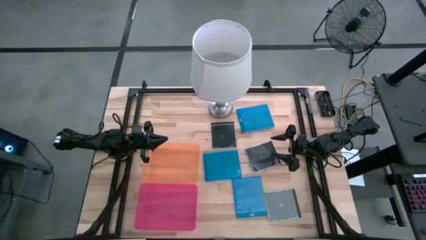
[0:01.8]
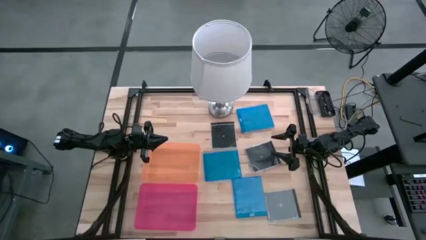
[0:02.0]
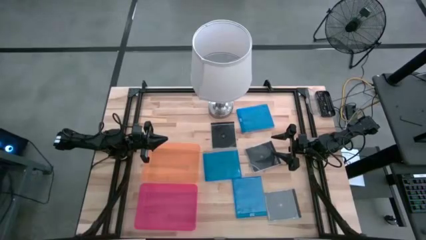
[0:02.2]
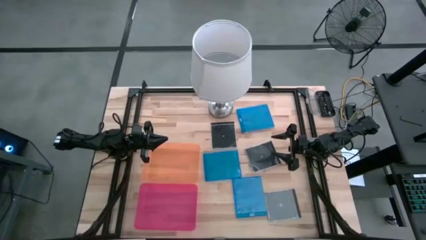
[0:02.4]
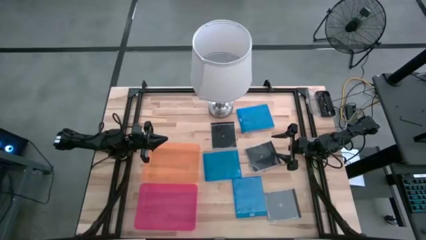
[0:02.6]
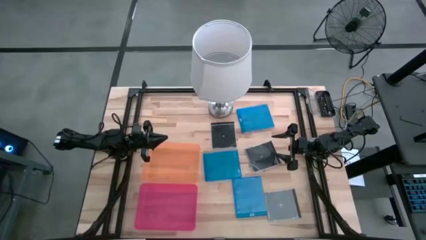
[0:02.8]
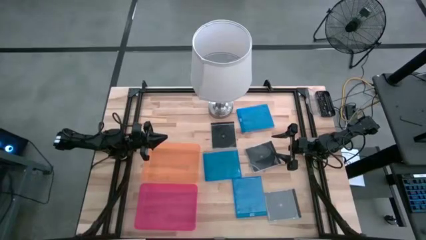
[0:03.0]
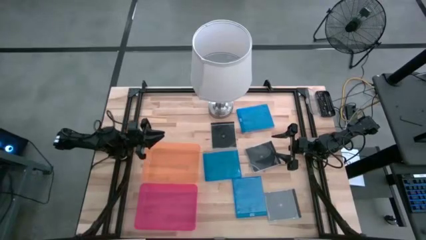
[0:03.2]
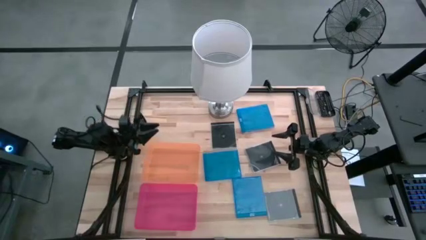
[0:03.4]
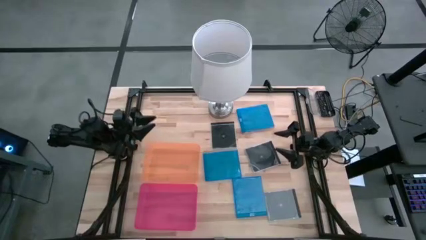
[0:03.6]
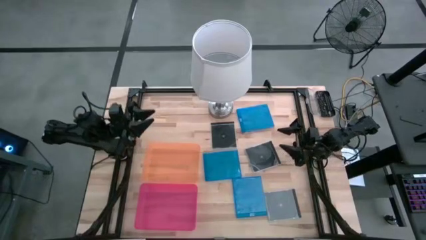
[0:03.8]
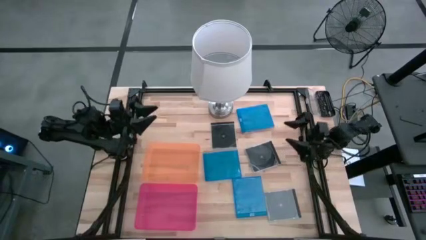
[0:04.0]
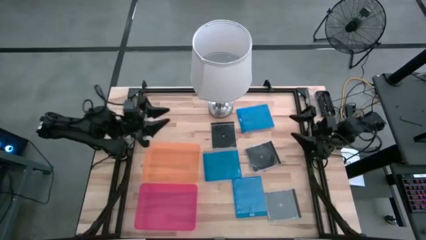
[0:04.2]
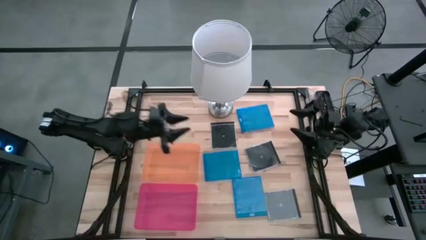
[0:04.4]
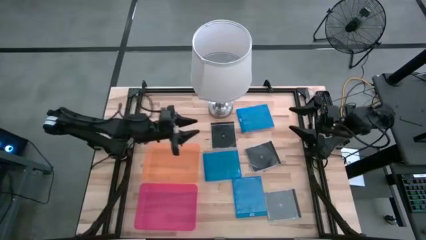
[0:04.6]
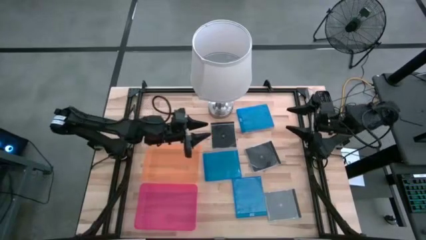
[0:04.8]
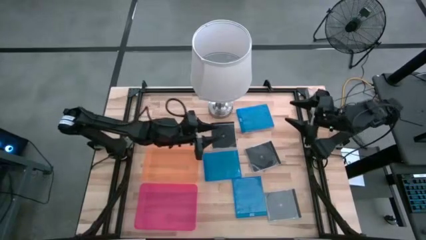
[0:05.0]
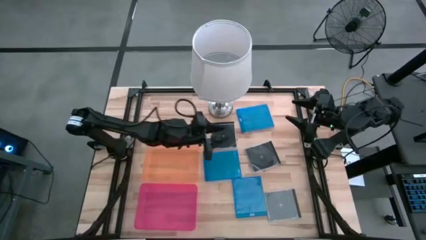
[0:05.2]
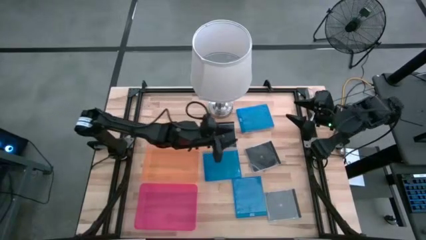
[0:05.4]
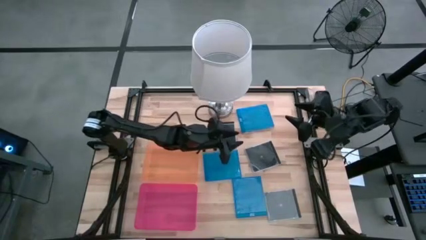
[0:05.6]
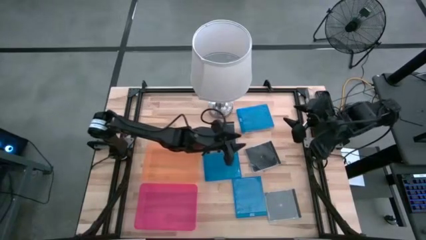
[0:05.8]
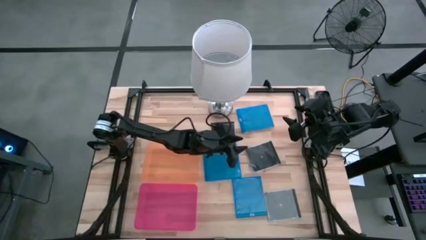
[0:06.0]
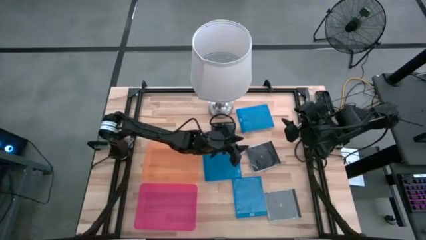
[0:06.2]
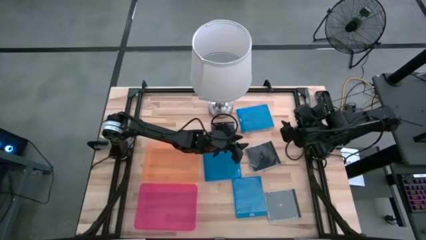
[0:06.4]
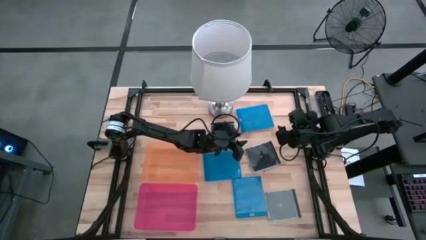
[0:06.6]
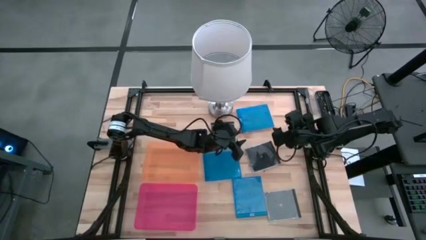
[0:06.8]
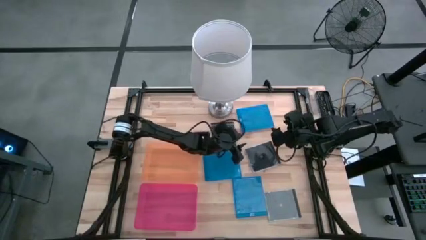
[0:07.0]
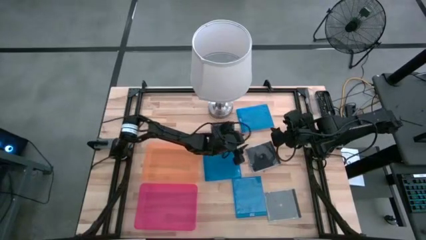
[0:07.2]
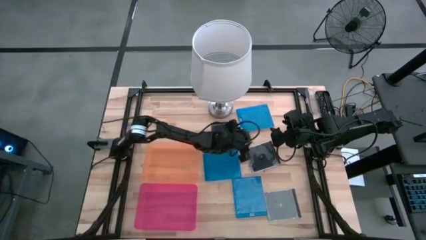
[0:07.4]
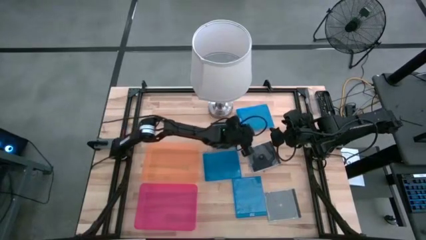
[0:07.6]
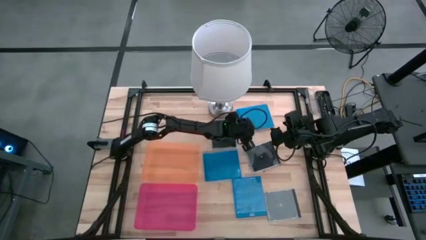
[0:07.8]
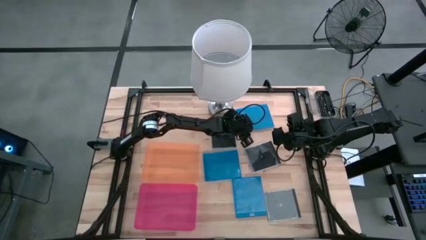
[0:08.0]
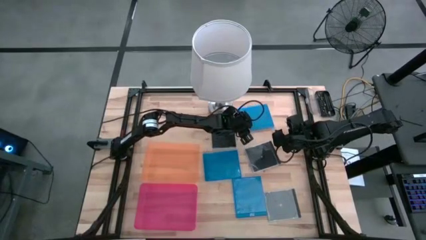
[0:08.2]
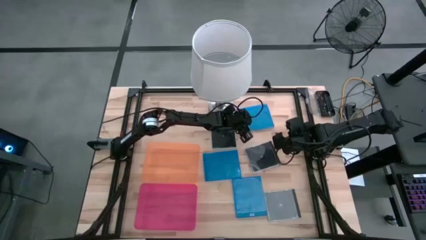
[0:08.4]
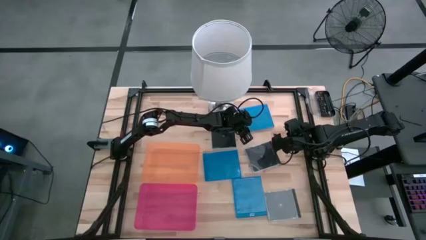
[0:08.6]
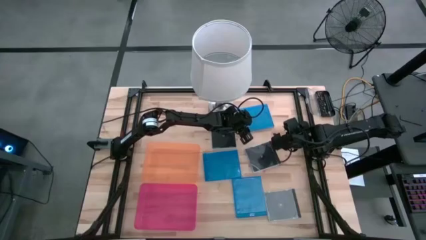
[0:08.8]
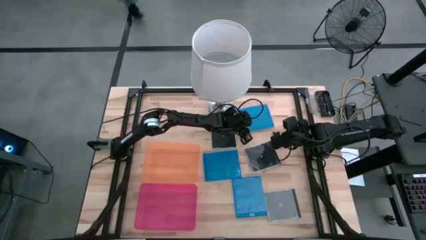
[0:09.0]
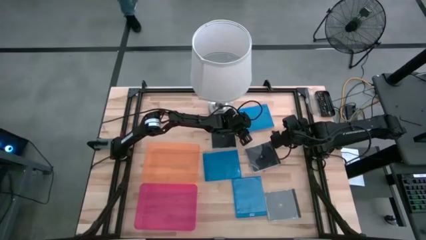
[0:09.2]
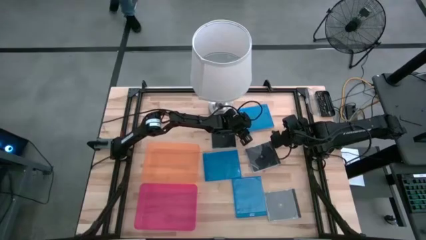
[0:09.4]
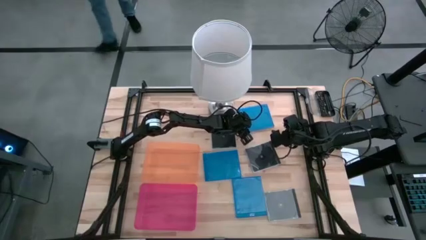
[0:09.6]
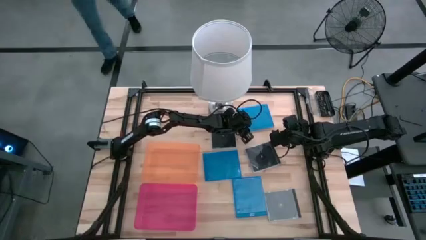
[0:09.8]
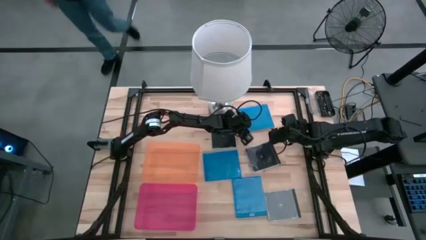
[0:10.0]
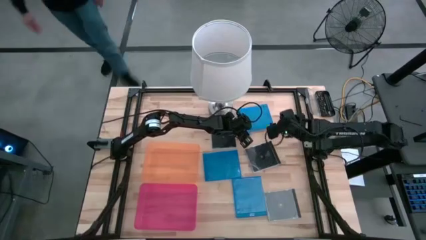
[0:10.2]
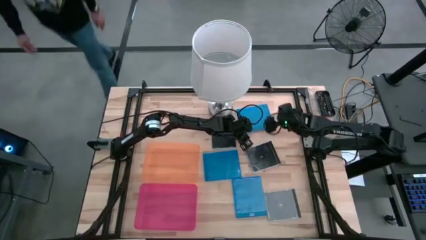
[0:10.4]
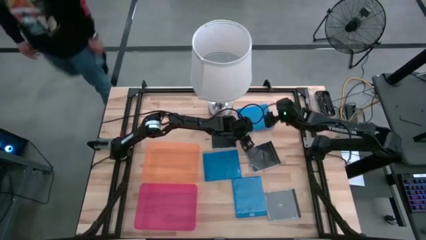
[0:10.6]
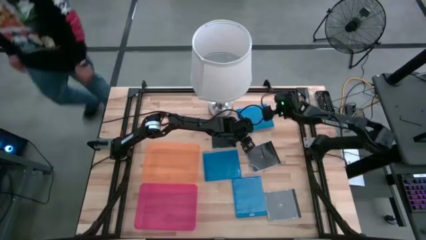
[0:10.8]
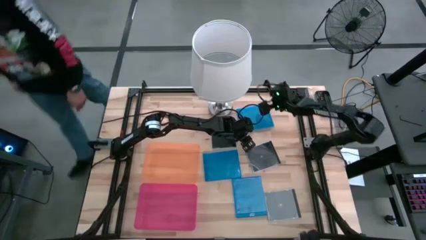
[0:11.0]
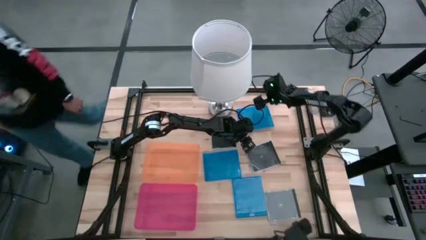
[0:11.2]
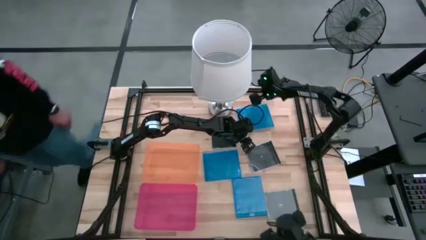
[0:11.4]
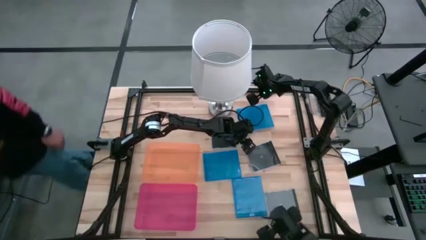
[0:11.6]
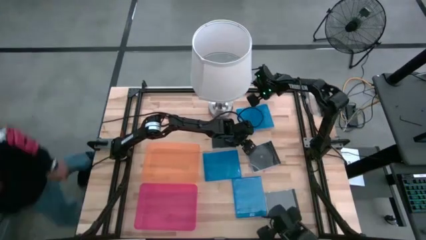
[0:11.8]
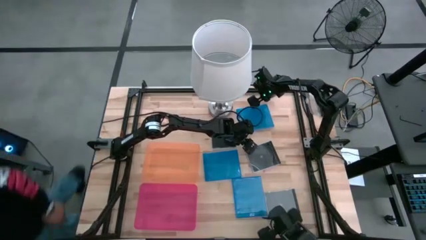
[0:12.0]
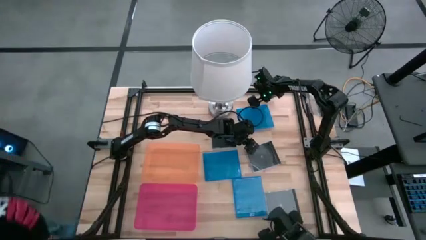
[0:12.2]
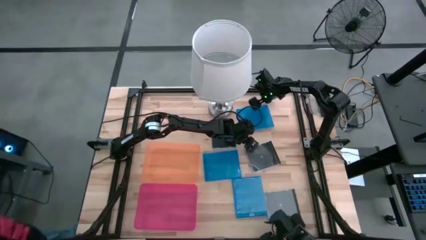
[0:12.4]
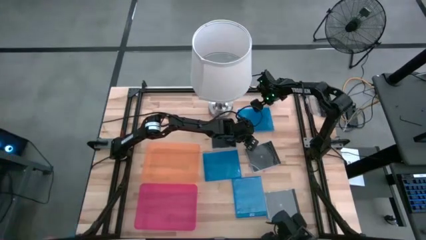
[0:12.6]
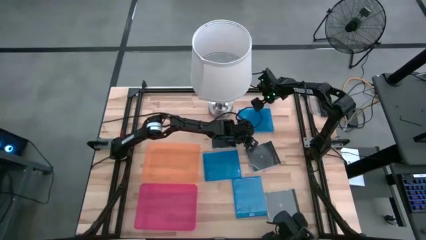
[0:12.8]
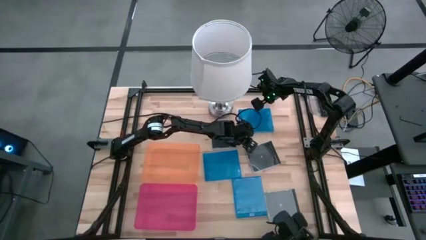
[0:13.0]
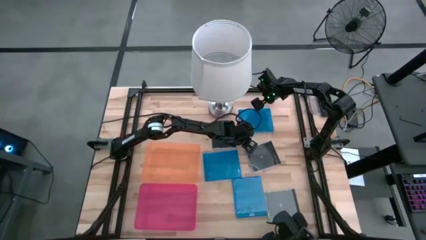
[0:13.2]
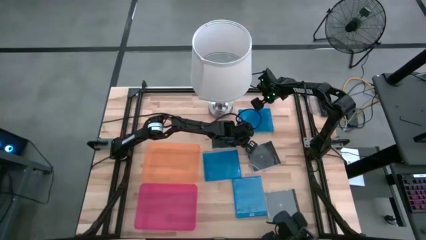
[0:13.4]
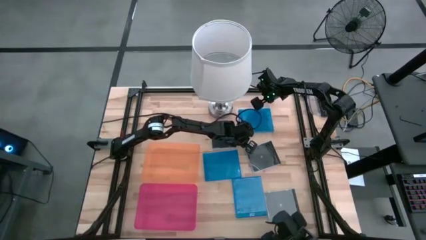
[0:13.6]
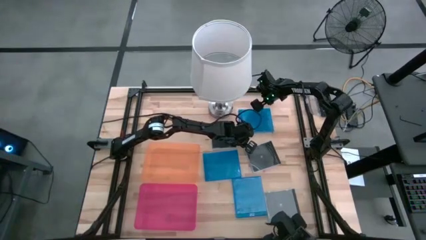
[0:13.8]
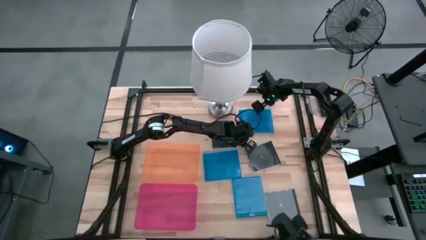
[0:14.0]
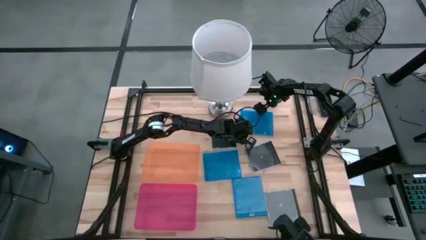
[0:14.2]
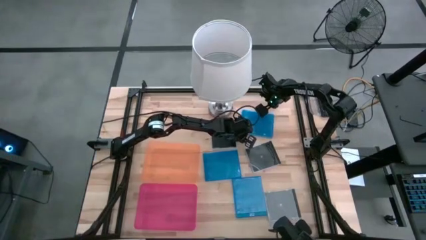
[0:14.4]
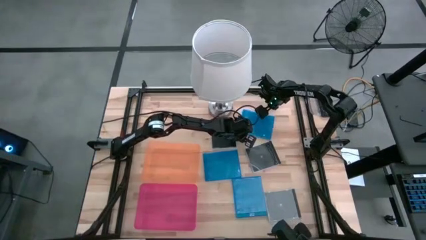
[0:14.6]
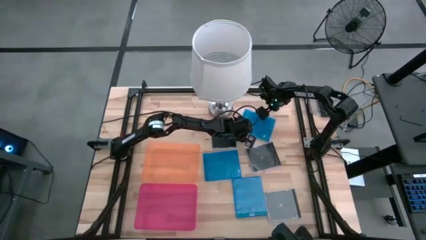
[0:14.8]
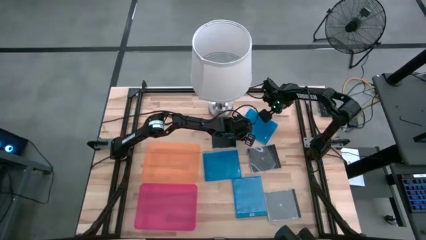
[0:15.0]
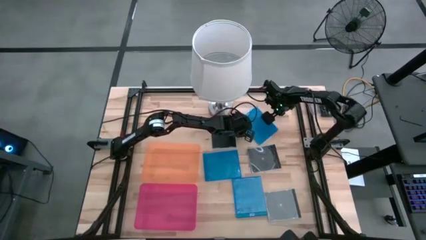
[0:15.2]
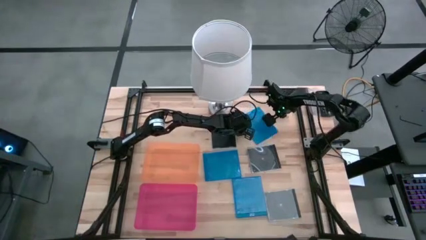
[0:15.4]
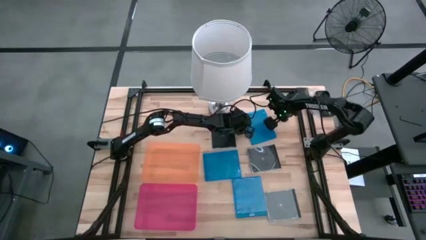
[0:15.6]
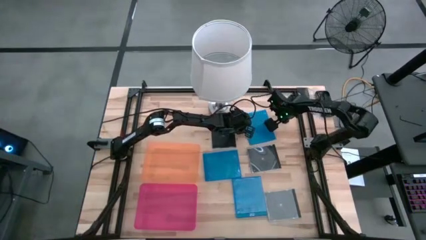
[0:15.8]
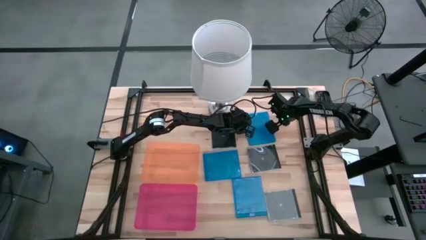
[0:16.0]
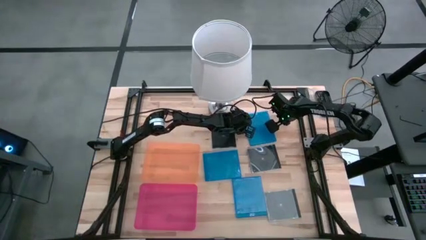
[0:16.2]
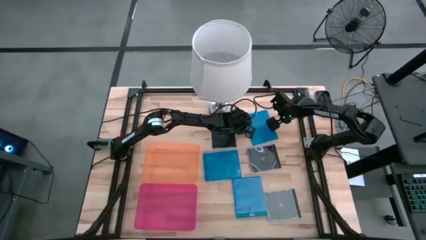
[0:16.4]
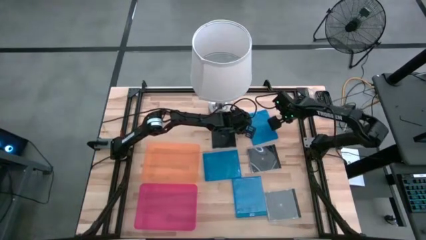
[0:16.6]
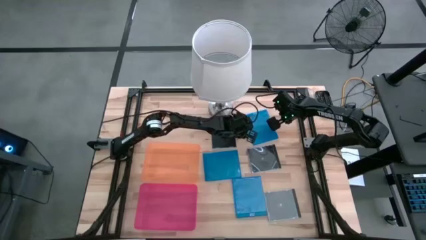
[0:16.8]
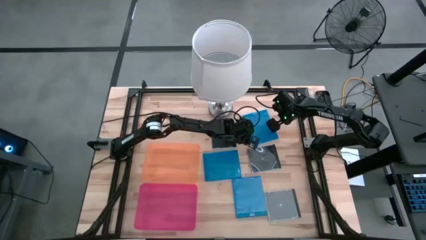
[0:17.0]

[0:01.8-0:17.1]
Task: Pick & place jewel cases by type
Put the top blue CD case into the orange bin
